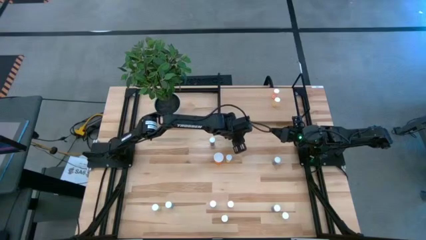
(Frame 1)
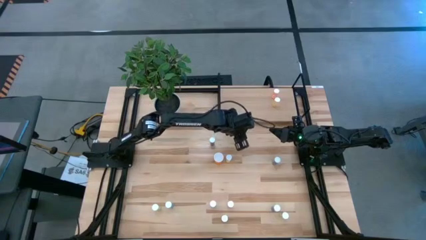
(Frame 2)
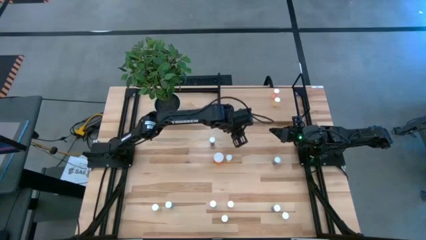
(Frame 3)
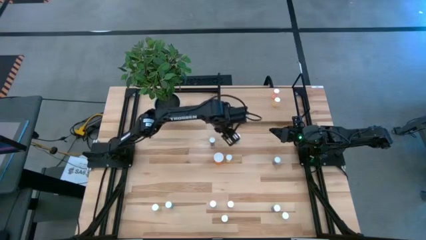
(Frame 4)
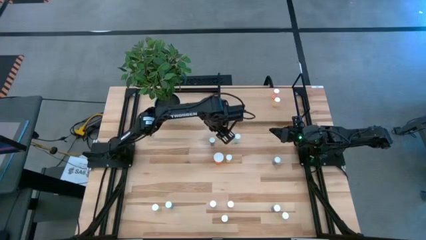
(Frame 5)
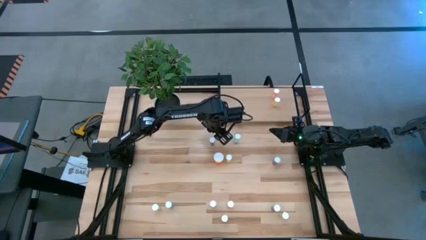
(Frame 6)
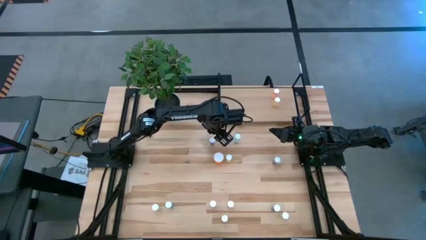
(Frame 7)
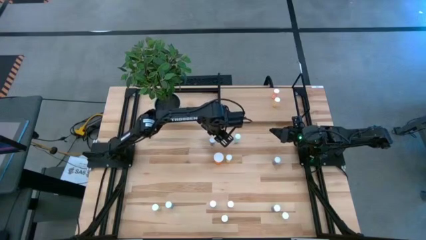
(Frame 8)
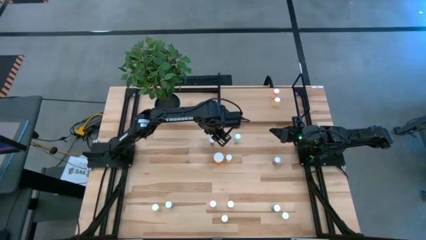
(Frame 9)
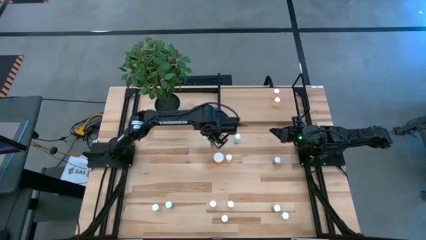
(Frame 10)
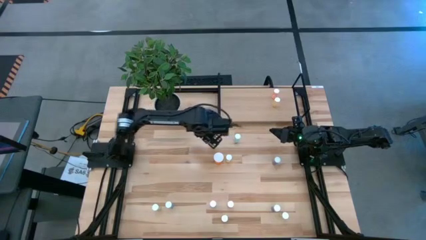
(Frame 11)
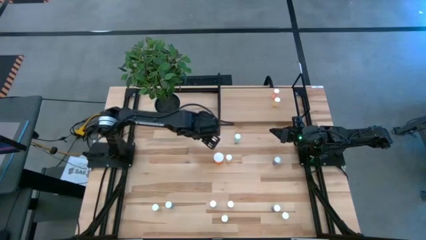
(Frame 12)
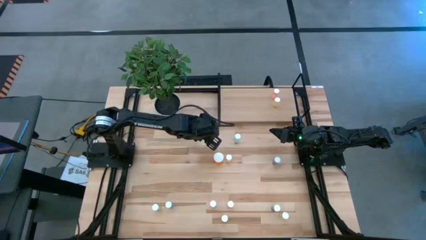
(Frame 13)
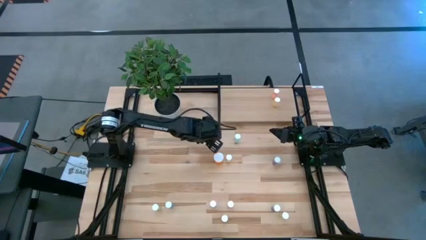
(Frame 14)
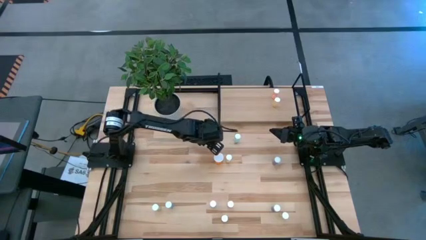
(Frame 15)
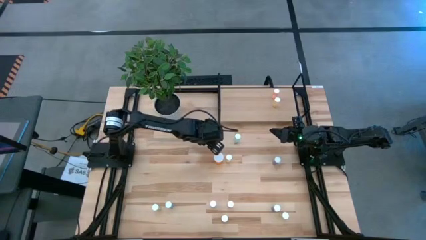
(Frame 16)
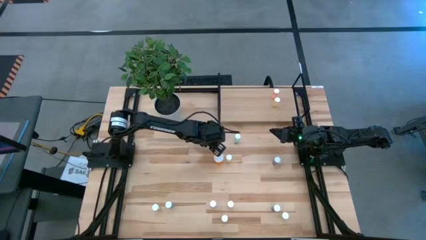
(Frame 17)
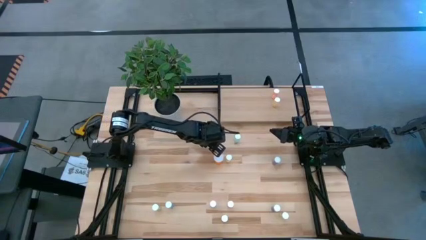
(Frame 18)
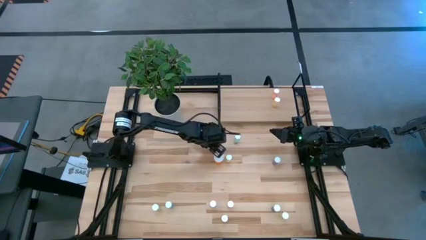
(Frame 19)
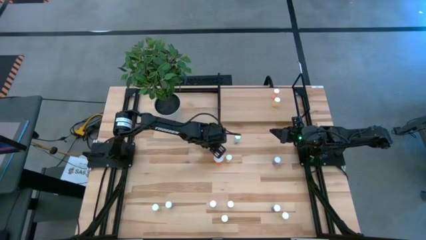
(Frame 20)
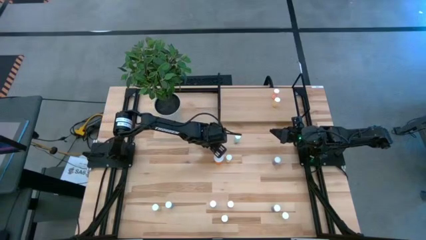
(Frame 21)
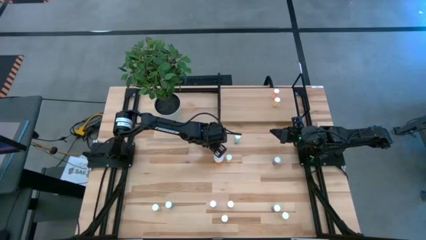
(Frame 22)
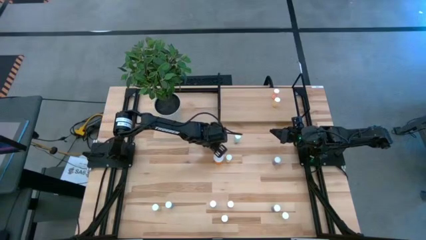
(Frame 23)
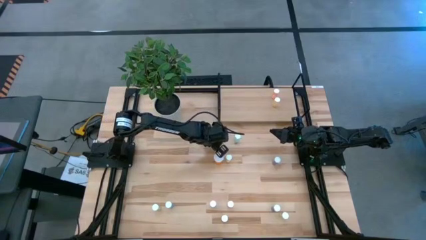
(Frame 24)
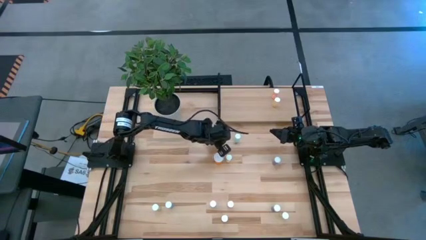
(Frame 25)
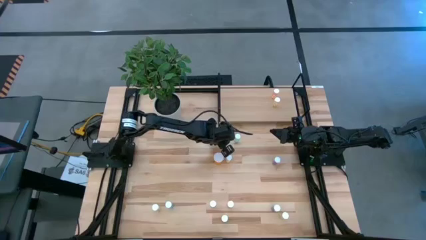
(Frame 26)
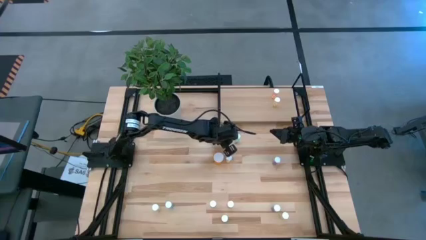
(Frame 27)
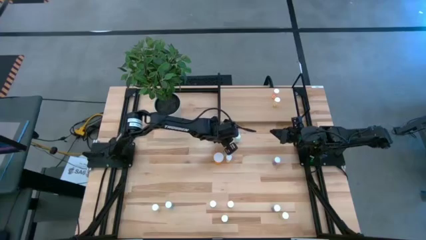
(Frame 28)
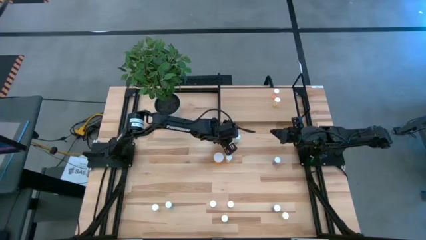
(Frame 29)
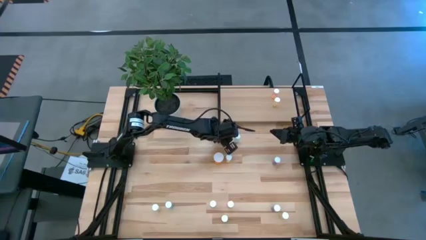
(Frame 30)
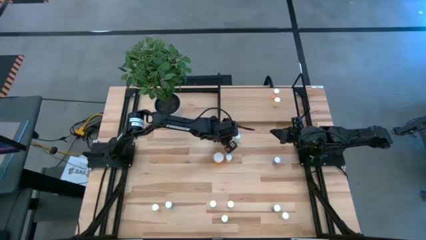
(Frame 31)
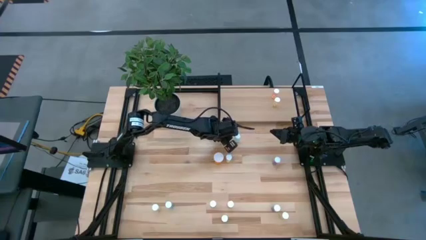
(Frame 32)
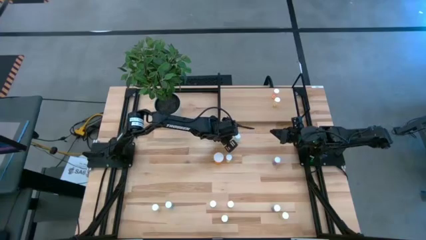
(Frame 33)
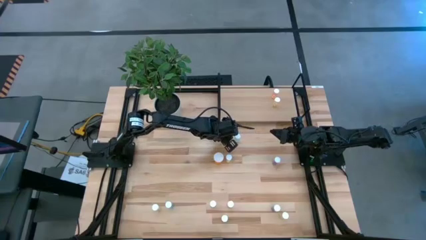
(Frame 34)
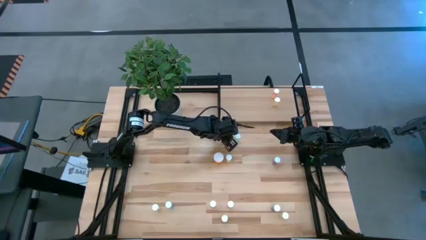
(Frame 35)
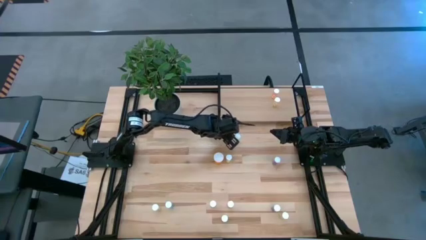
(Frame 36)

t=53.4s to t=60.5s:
Task: Pick and place medicine bottles onto shelf by color
Adjust the blue pill bottle

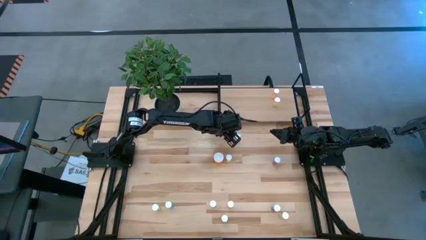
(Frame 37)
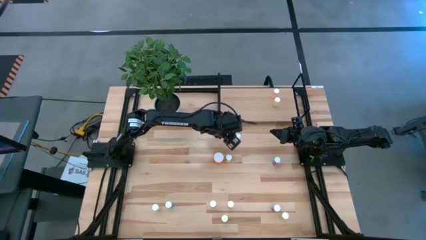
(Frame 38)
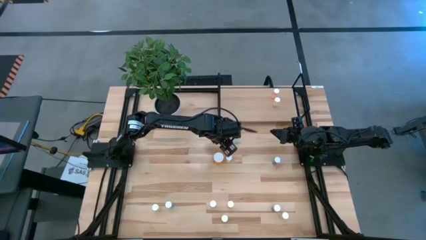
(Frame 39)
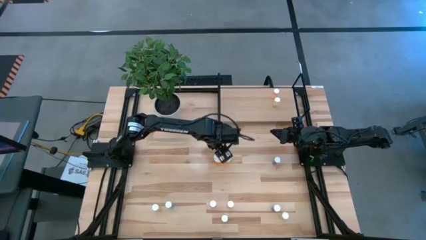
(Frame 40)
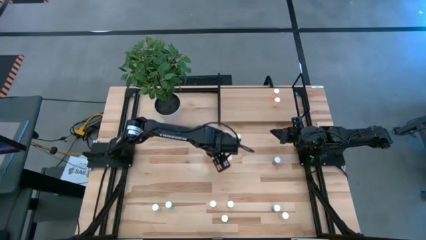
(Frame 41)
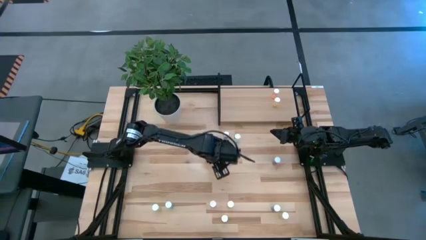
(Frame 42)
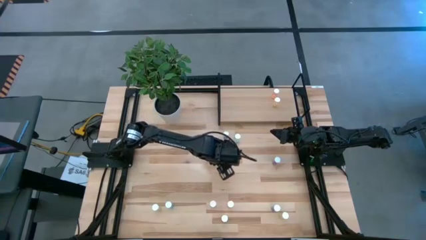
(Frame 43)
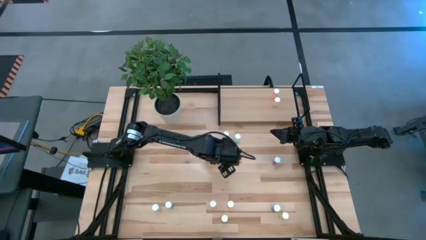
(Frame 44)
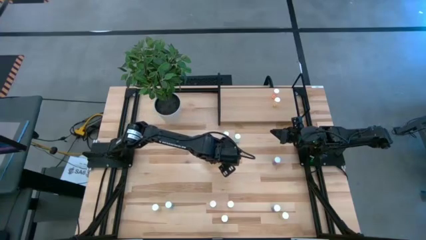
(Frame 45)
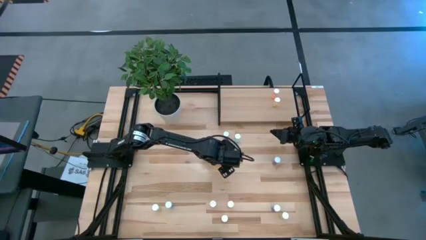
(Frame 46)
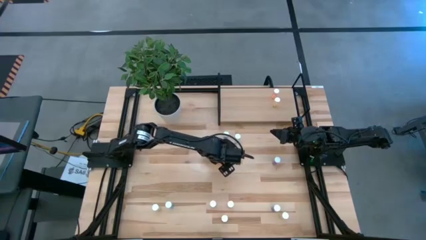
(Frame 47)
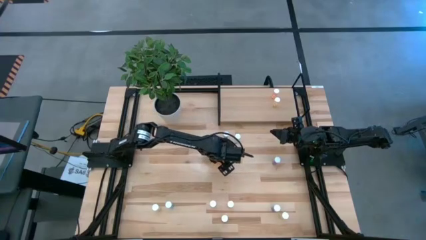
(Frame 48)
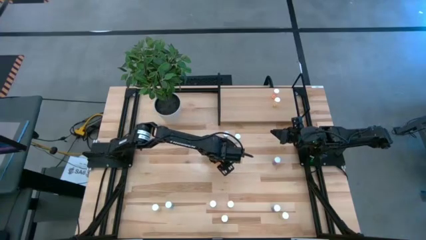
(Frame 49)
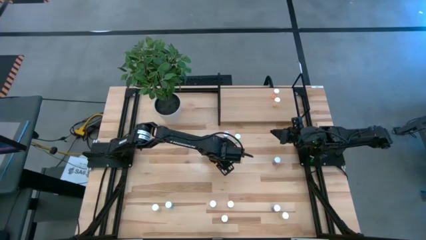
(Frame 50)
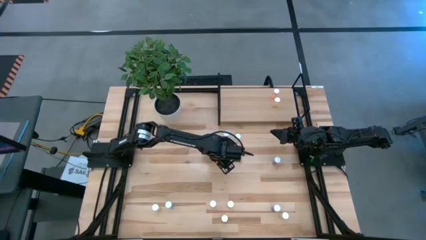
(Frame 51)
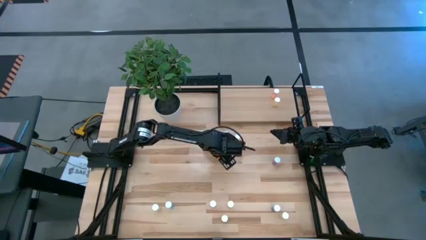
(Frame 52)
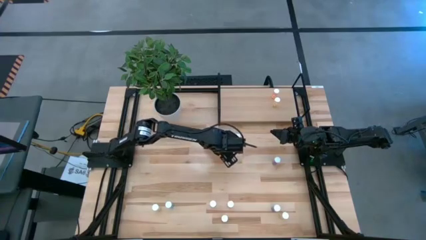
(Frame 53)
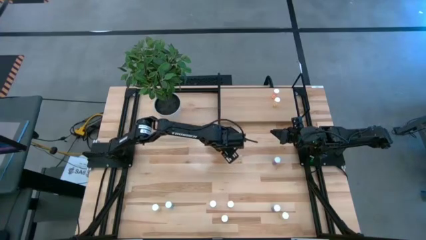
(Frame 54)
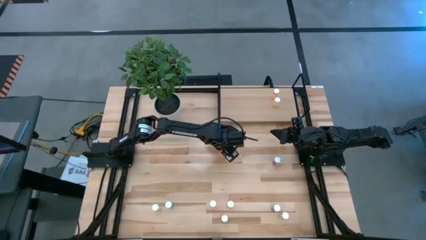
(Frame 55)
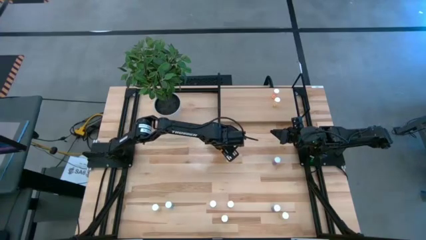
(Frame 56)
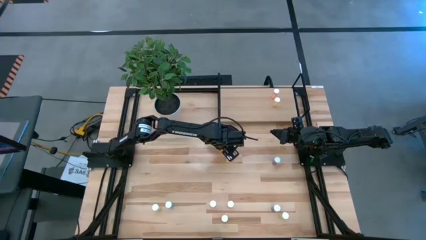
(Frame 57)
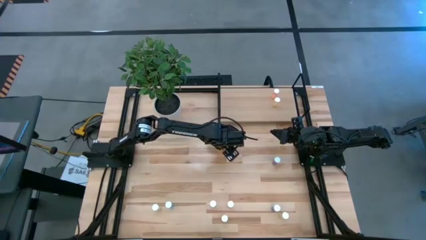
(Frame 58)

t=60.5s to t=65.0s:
Adjust the orange pill bottle

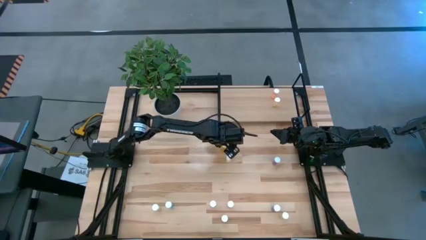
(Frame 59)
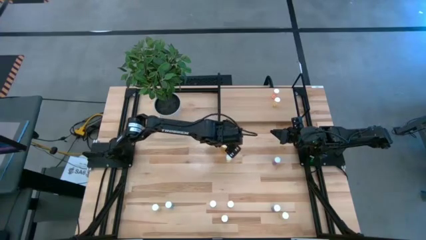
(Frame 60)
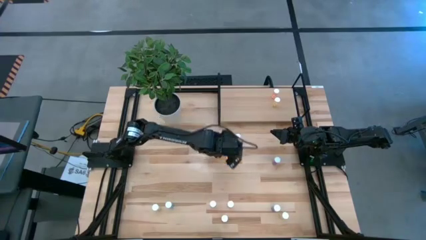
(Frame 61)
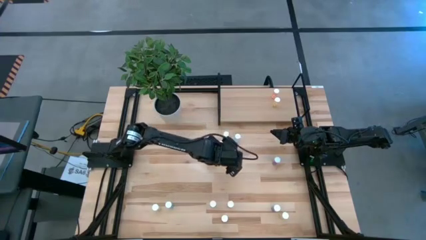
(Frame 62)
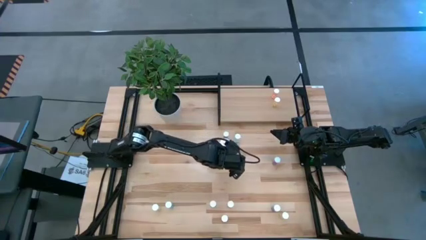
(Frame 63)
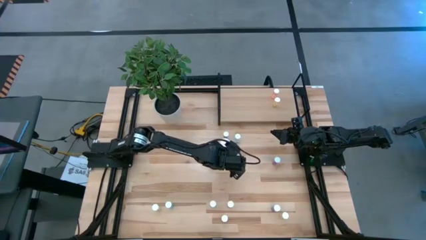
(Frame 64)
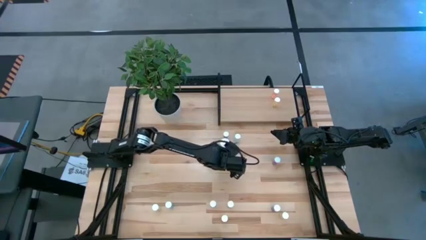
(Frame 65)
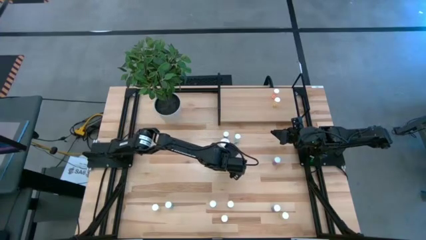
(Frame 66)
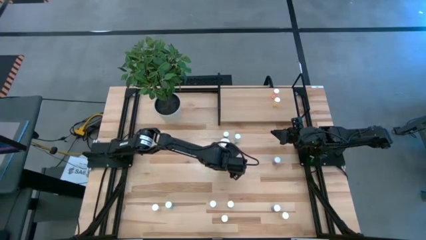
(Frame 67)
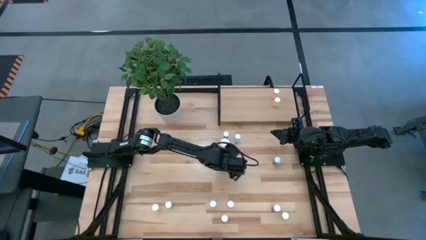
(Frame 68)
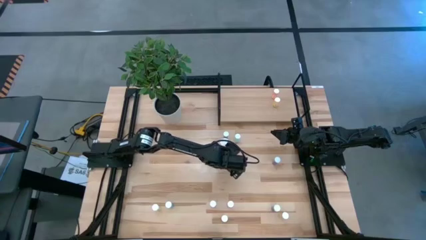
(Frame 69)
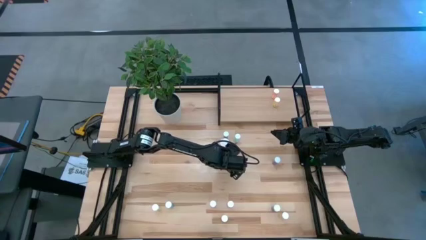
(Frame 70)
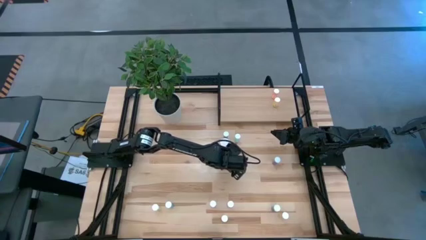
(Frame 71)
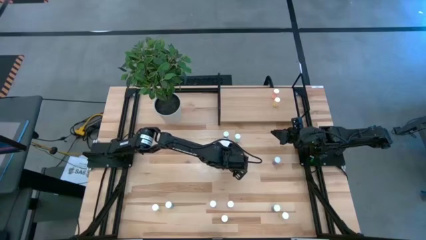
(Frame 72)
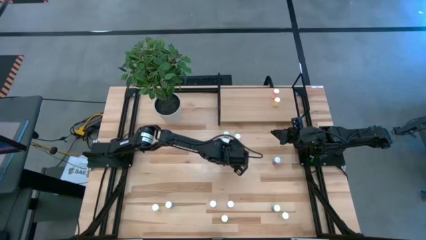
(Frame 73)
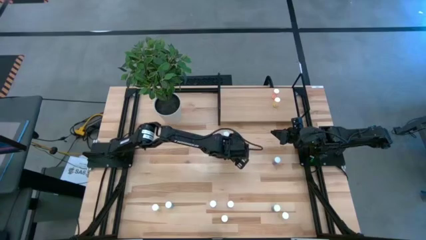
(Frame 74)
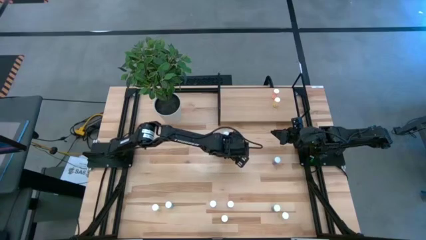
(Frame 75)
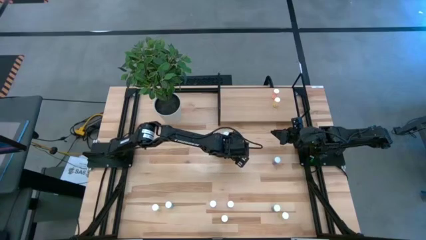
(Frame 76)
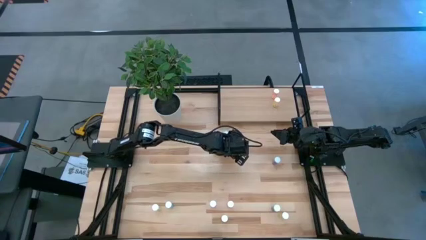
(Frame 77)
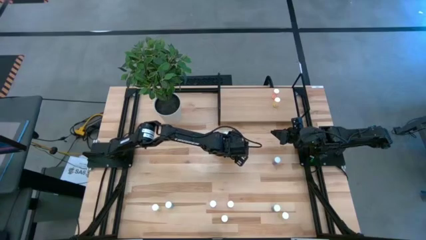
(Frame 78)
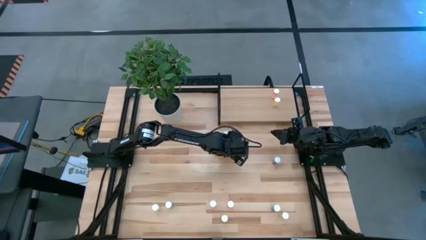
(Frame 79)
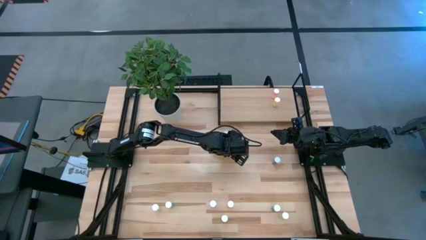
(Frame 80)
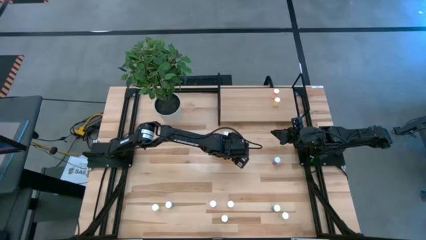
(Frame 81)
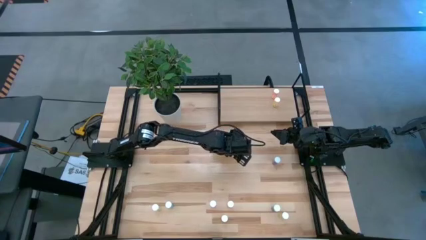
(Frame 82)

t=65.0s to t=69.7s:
Adjust the yellow pill bottle
